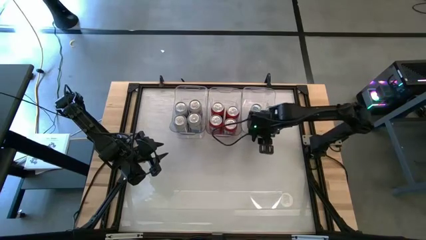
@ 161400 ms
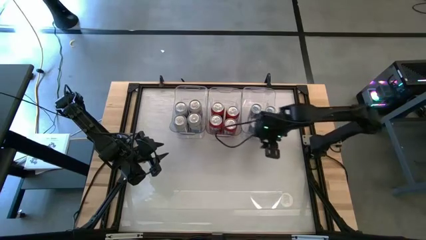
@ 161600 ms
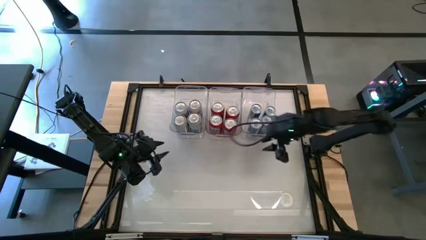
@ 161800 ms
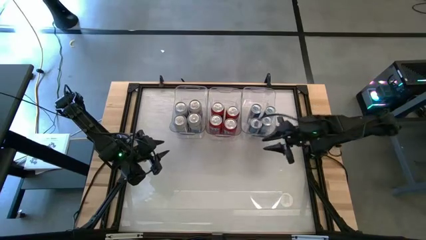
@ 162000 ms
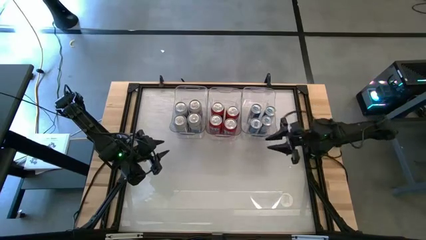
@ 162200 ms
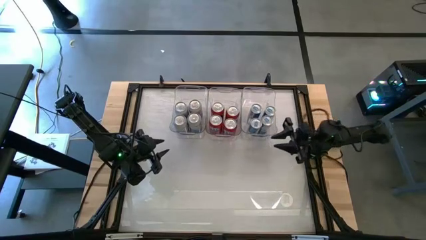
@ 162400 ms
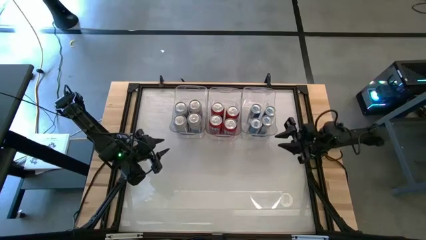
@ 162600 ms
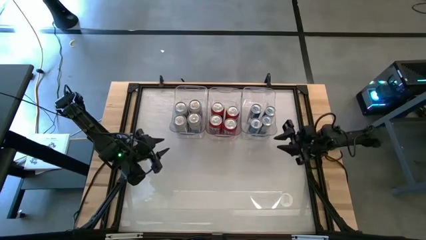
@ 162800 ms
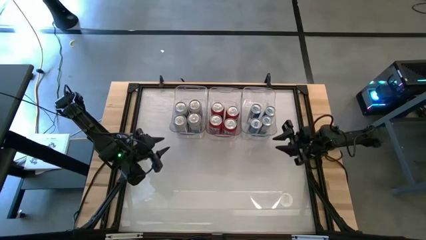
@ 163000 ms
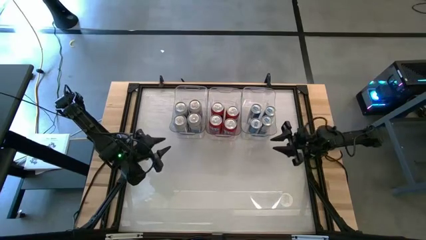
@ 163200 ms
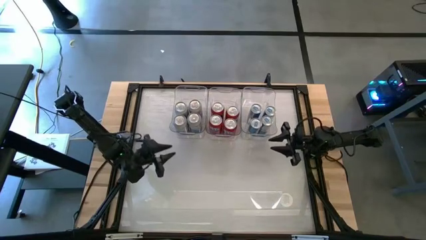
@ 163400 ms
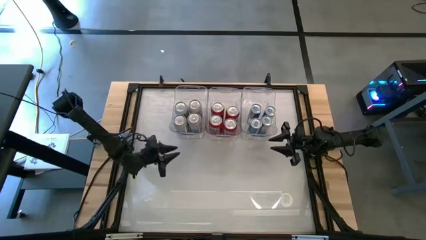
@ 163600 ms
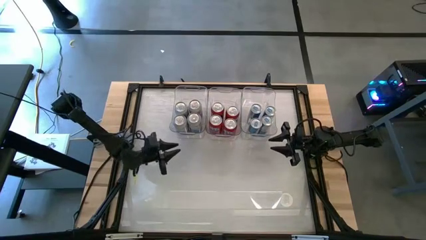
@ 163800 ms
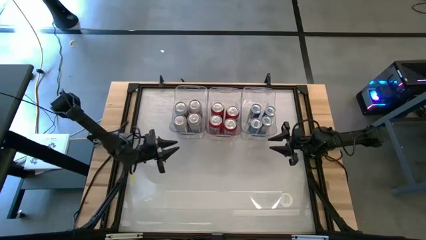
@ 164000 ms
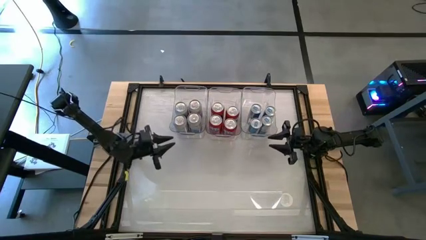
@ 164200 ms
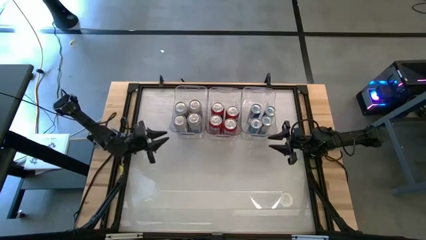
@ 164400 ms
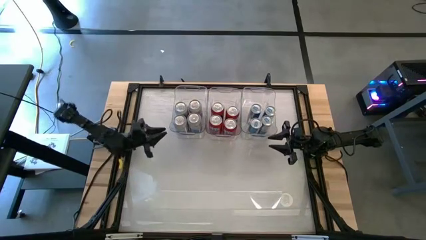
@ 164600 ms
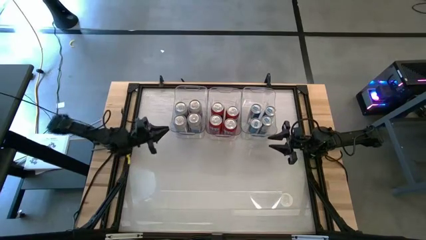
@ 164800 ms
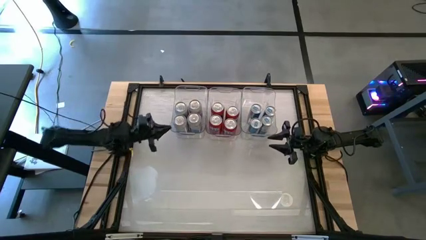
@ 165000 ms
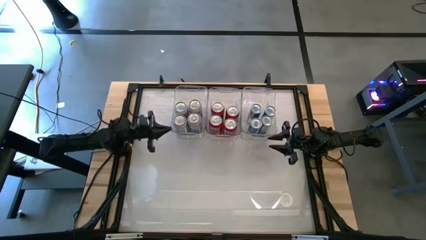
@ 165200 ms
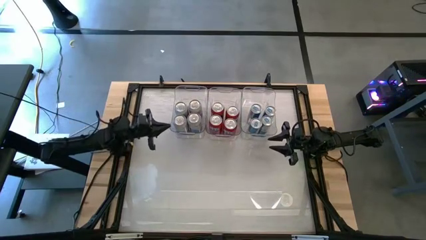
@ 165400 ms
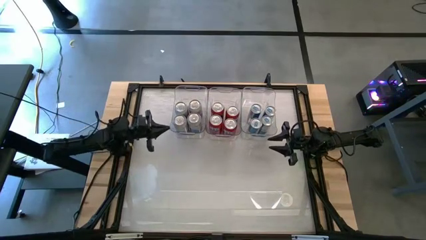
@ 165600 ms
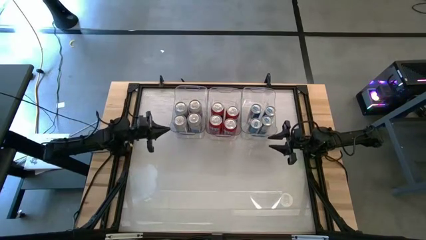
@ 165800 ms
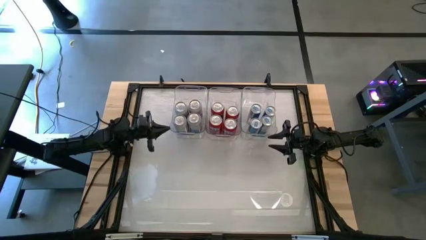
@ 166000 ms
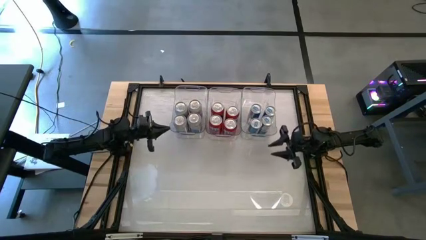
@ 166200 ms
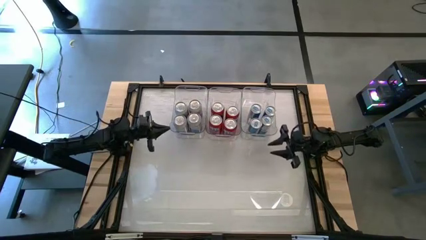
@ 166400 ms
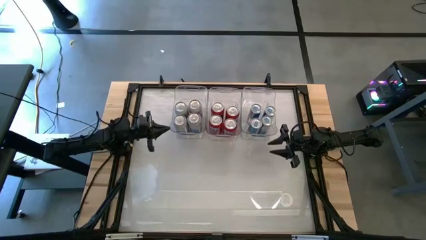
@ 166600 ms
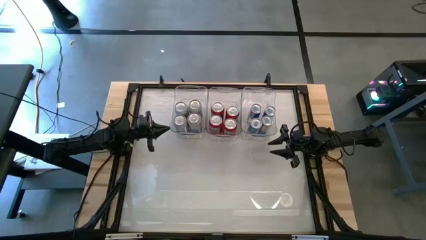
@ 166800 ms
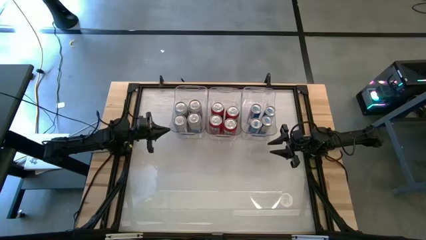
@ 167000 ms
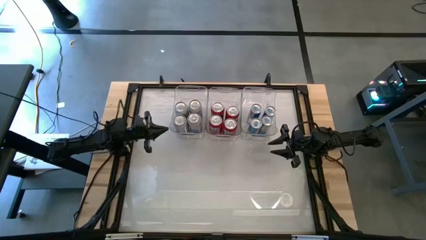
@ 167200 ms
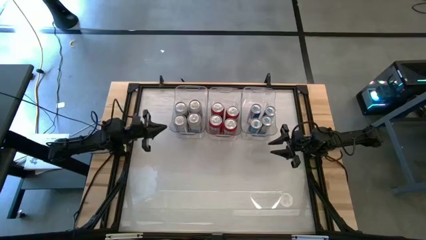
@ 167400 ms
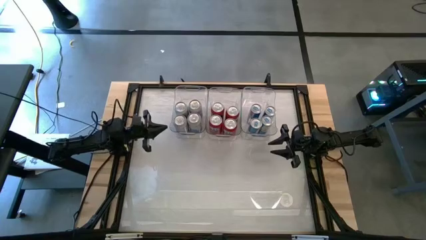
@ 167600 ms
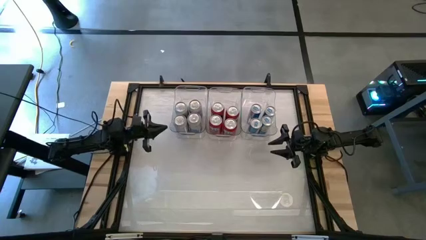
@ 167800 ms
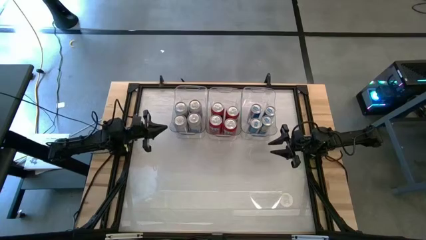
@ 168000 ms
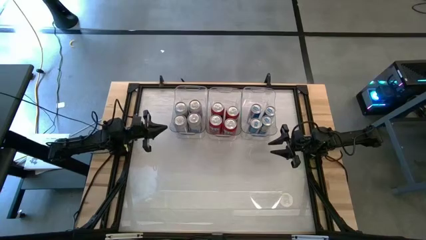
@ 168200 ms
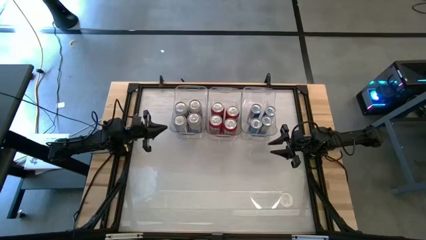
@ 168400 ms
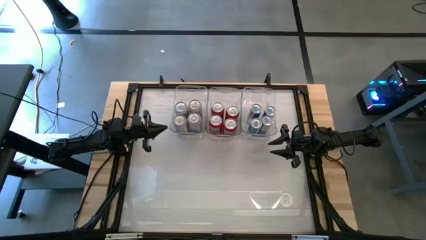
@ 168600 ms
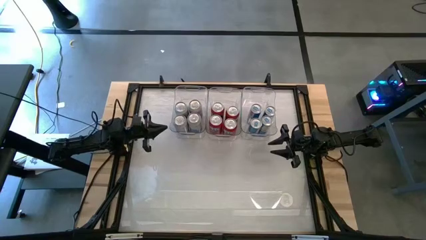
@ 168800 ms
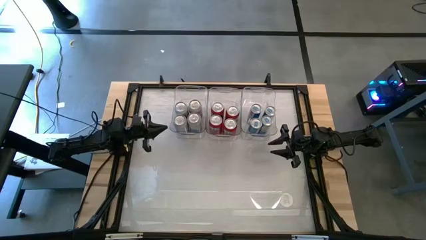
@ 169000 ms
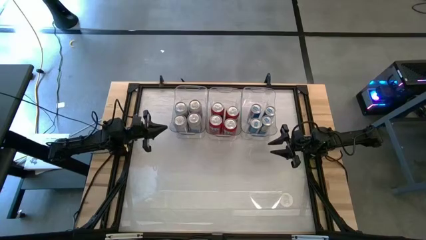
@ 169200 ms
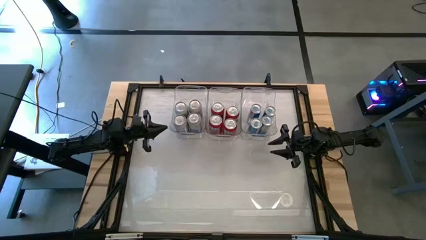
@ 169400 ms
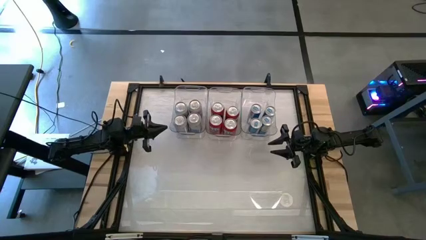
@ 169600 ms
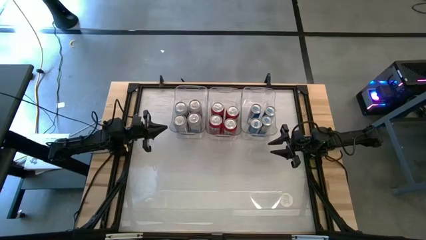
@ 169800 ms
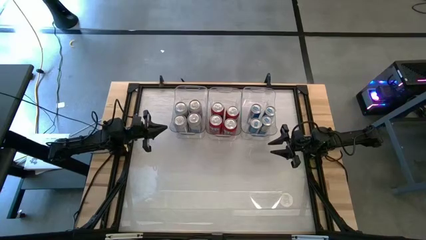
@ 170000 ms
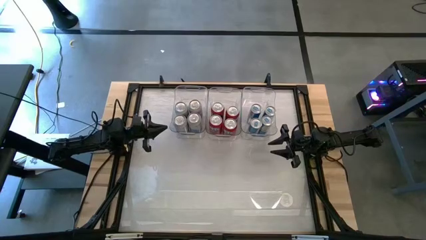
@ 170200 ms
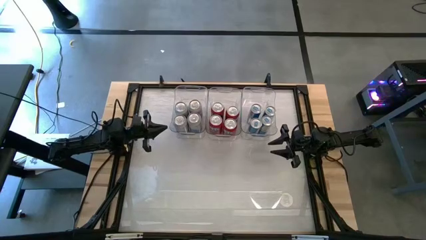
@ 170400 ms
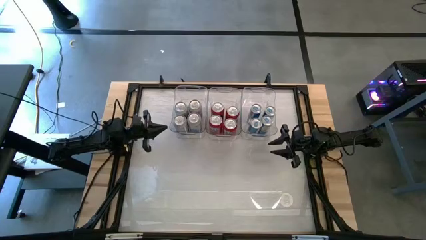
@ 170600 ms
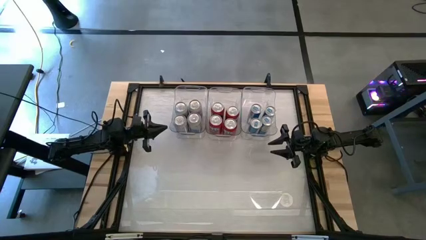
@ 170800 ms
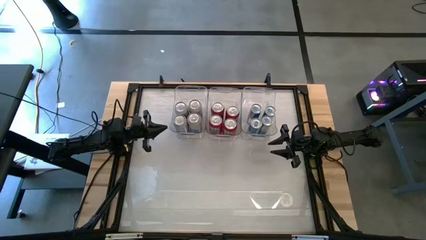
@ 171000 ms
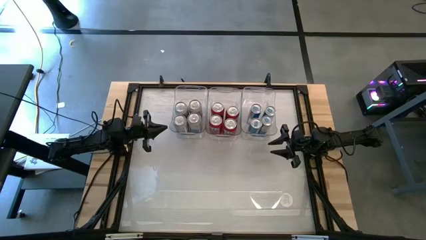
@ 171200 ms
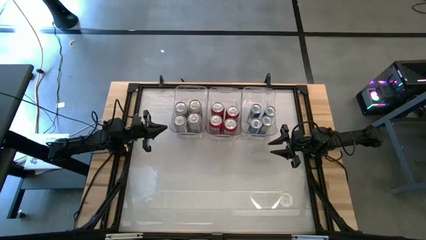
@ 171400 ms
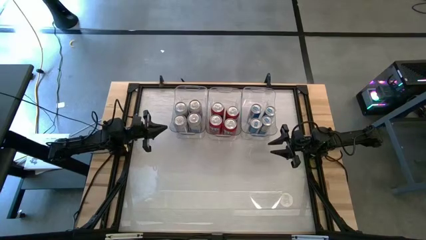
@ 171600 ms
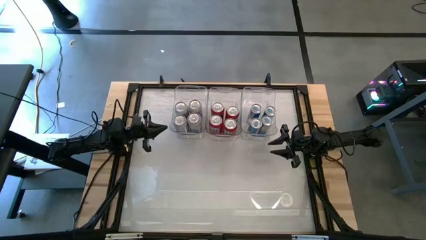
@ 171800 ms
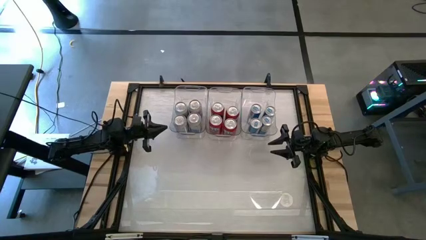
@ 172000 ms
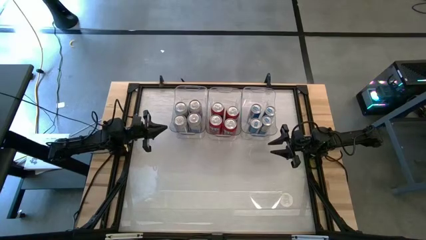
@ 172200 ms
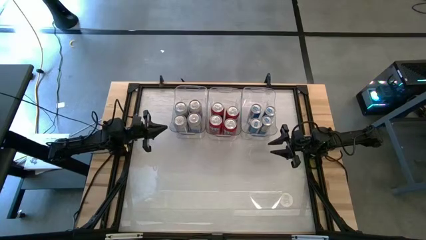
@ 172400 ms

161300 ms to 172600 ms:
Task: Sort soda cans
Return to Home Position

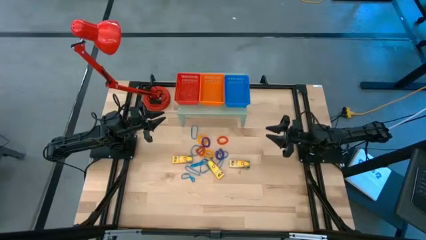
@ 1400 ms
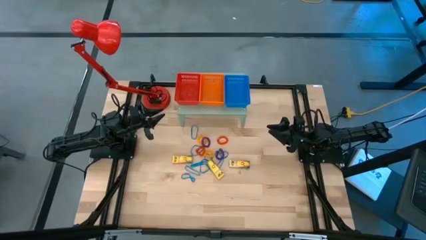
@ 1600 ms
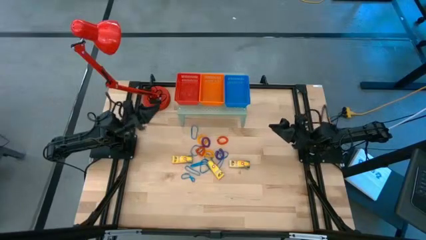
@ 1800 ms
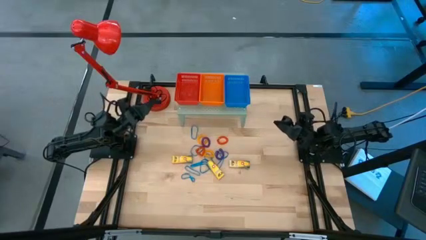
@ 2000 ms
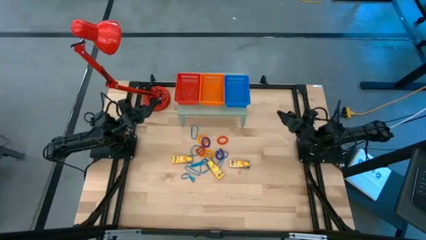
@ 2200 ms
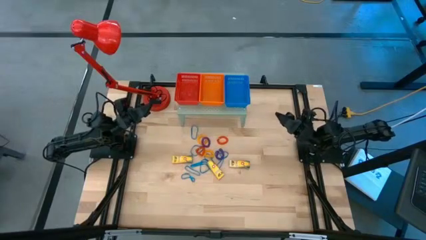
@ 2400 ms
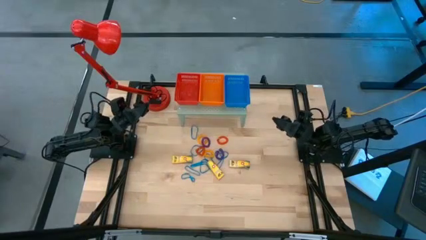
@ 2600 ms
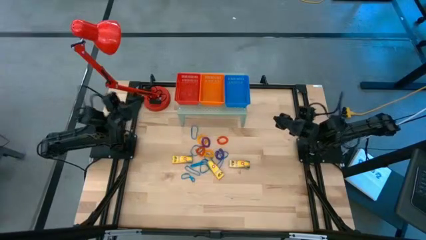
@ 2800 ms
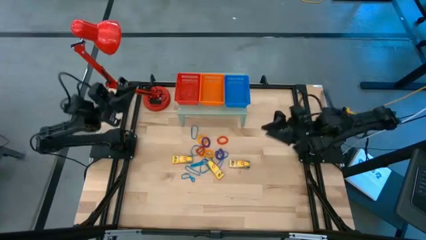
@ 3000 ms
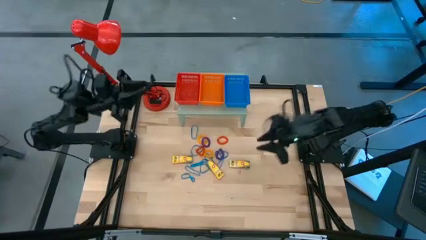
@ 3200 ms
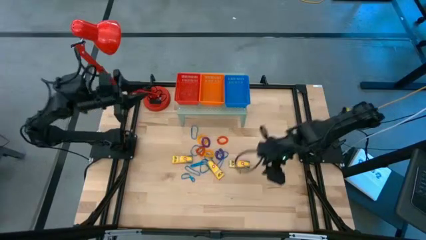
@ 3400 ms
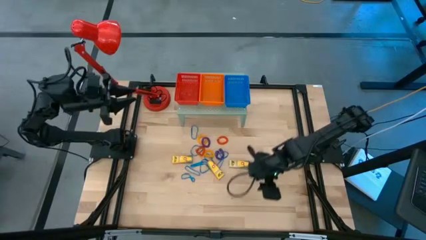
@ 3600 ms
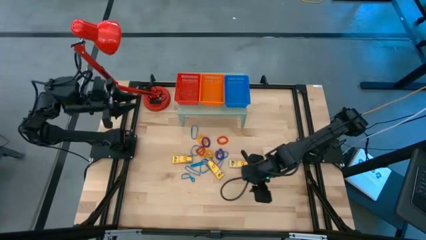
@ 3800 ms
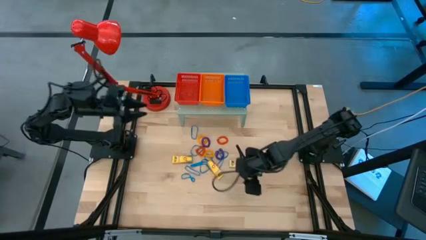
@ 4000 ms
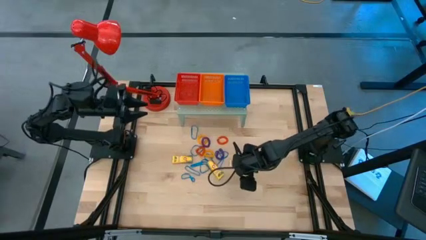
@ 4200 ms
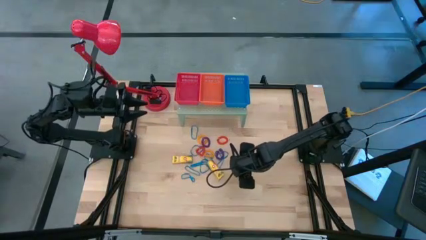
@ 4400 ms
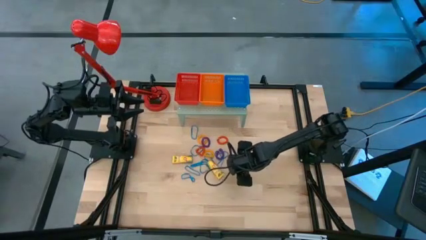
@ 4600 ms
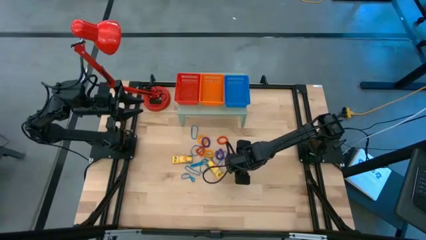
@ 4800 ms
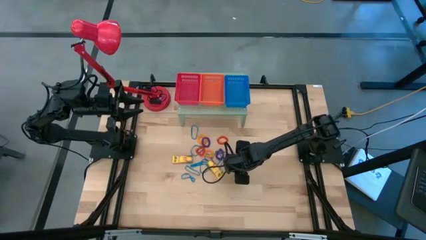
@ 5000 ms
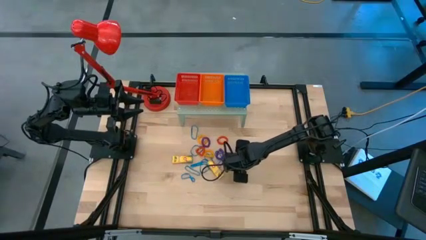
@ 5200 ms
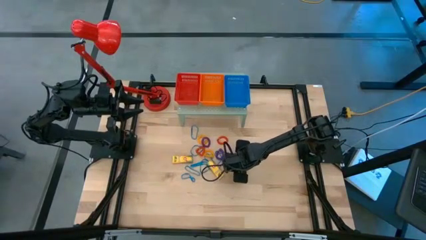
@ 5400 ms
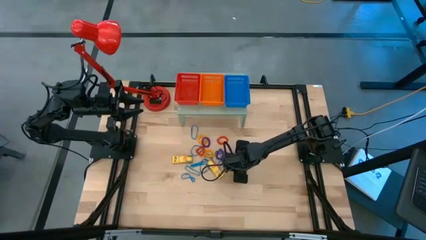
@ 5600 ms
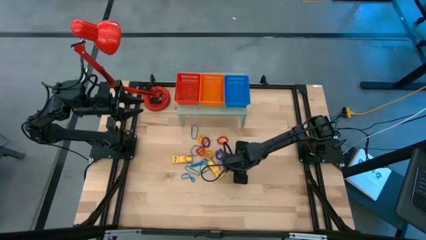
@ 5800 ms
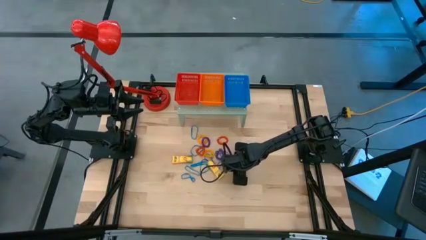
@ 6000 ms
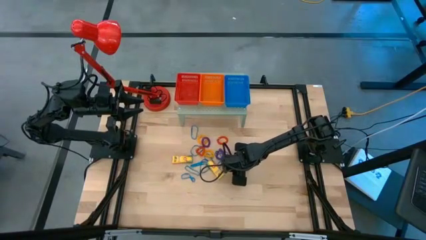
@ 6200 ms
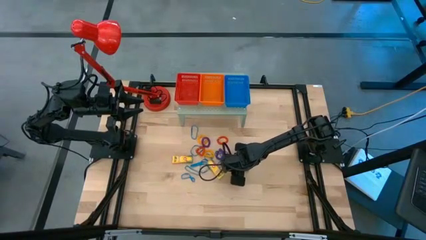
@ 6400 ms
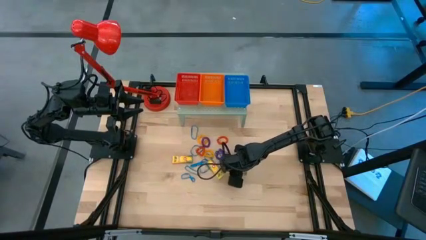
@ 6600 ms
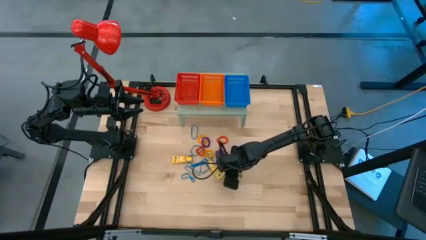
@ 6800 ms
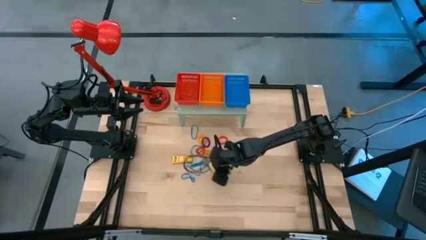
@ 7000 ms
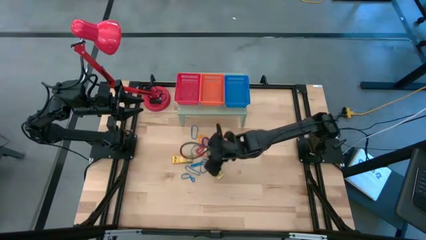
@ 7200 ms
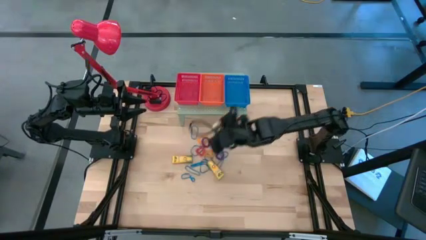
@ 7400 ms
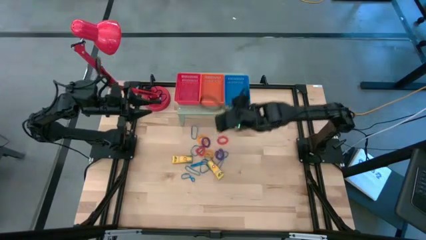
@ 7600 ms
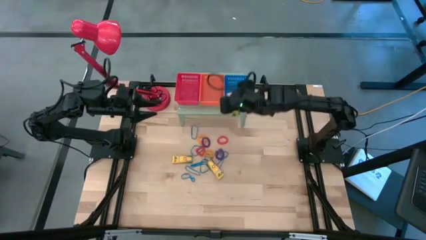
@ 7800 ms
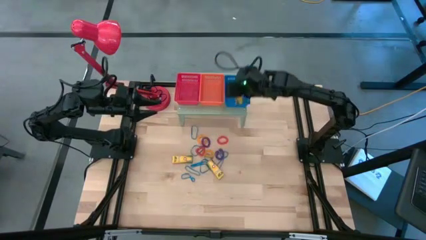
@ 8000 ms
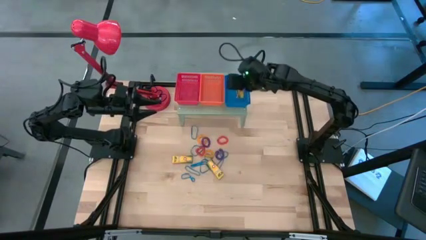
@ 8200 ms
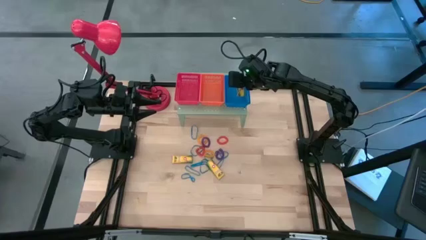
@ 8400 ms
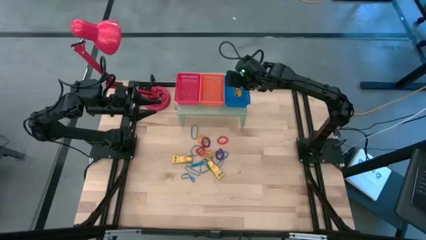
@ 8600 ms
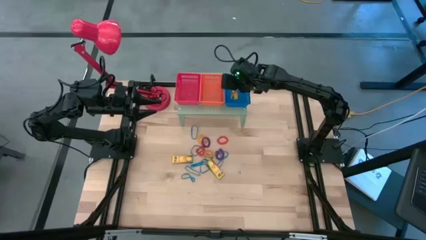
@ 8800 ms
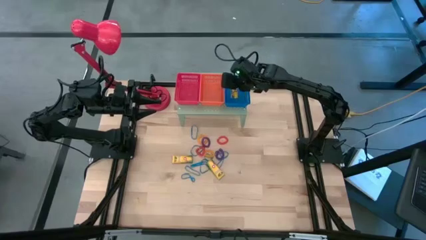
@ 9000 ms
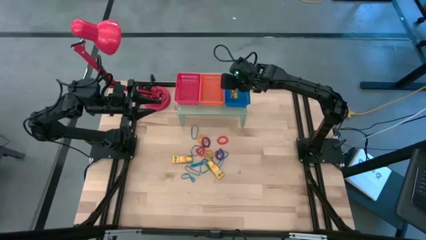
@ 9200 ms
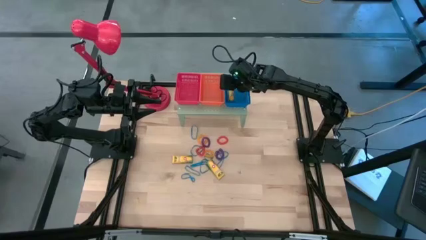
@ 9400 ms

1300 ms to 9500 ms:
Task: Pick & Place Office Desk Supplies
Put the yellow crayon box into the blue bin on the shelf
